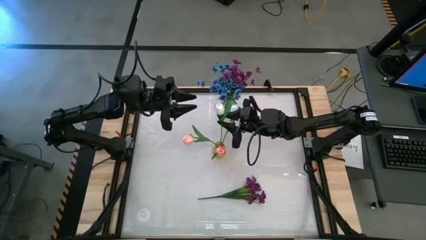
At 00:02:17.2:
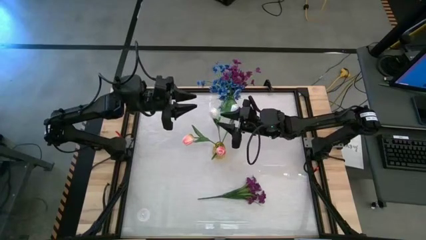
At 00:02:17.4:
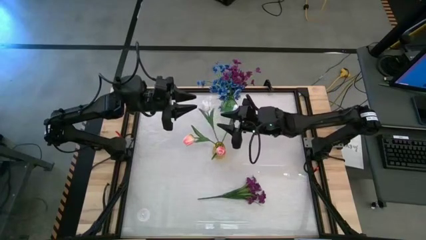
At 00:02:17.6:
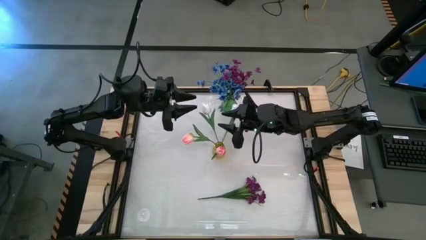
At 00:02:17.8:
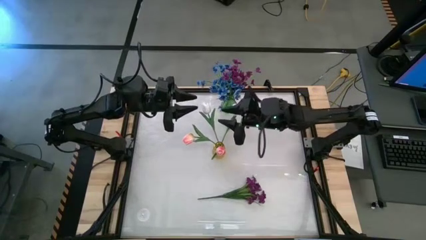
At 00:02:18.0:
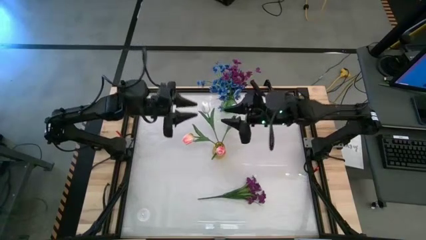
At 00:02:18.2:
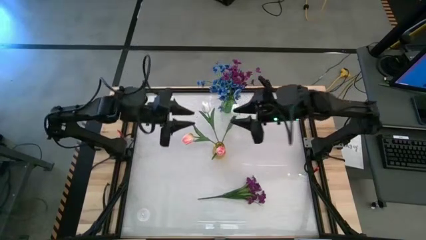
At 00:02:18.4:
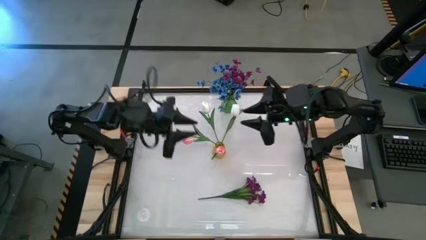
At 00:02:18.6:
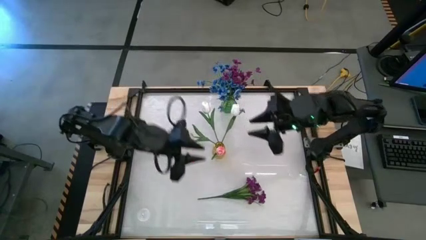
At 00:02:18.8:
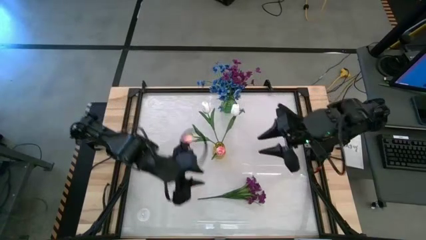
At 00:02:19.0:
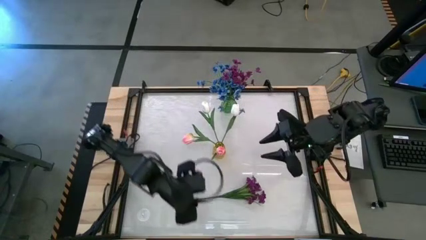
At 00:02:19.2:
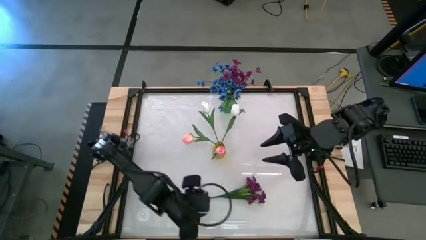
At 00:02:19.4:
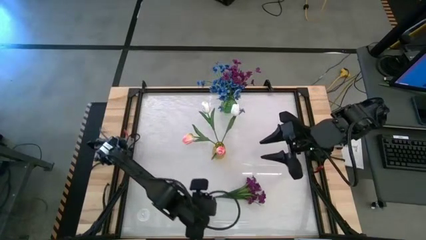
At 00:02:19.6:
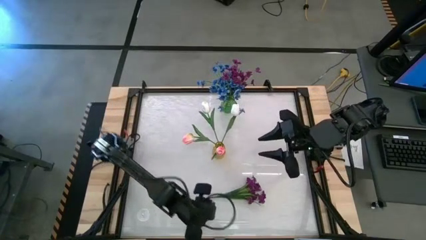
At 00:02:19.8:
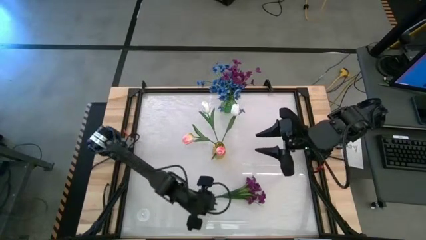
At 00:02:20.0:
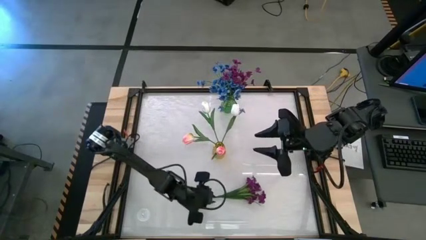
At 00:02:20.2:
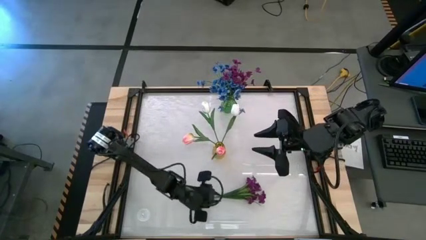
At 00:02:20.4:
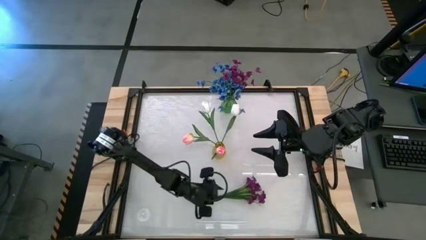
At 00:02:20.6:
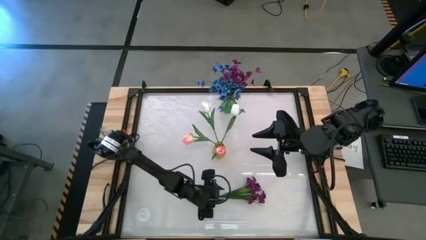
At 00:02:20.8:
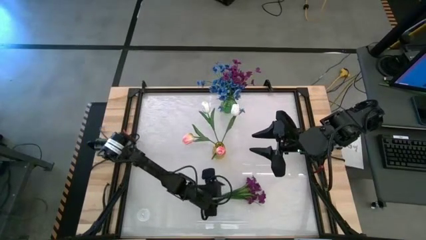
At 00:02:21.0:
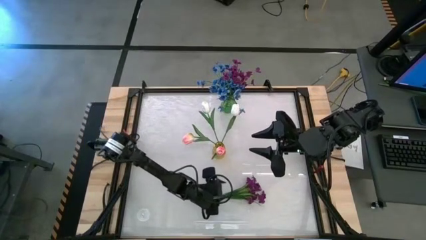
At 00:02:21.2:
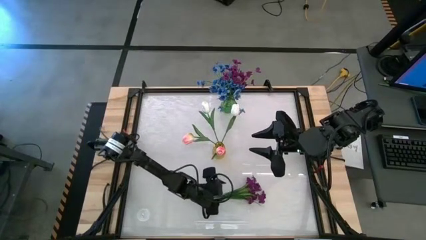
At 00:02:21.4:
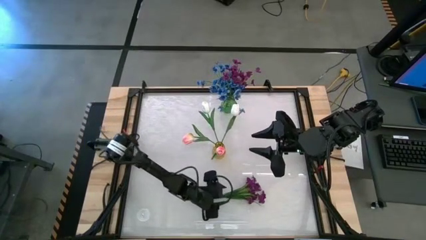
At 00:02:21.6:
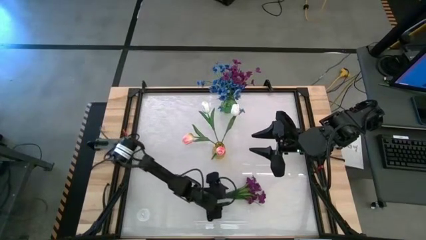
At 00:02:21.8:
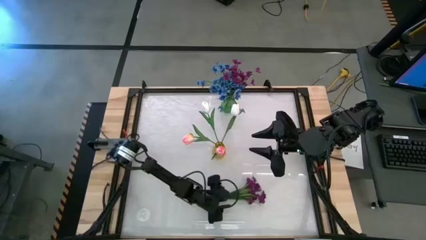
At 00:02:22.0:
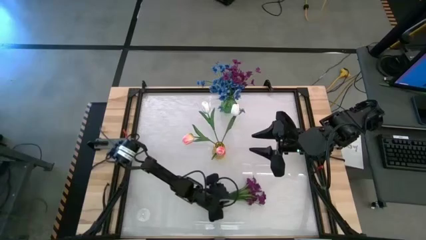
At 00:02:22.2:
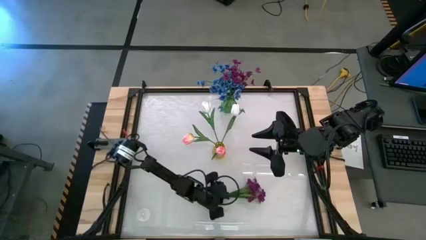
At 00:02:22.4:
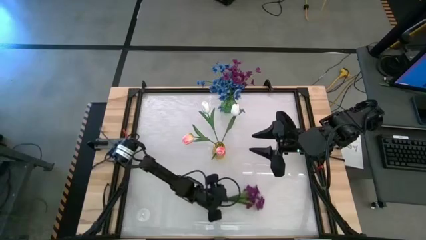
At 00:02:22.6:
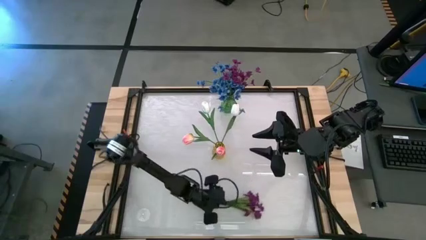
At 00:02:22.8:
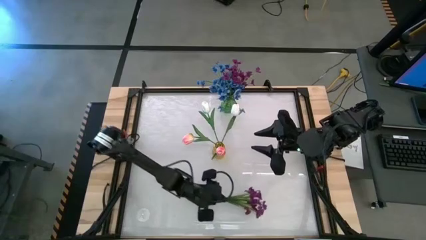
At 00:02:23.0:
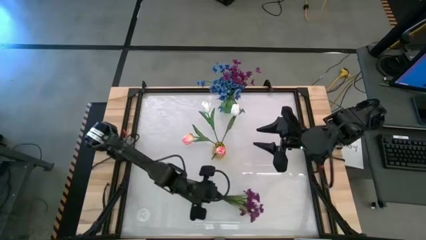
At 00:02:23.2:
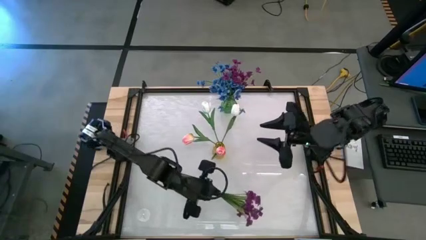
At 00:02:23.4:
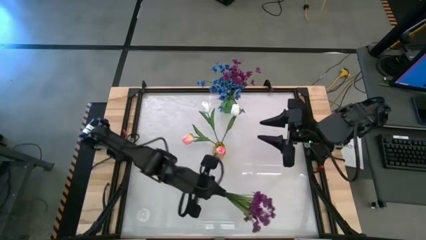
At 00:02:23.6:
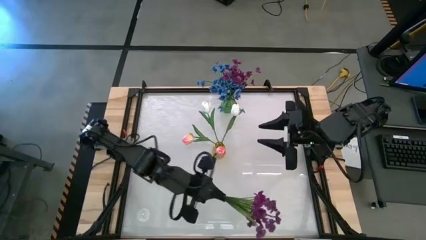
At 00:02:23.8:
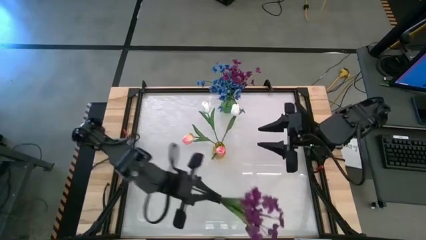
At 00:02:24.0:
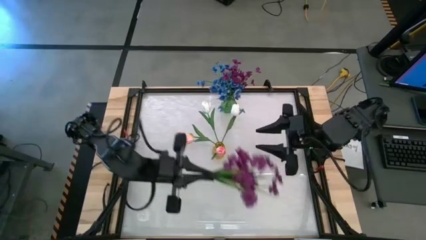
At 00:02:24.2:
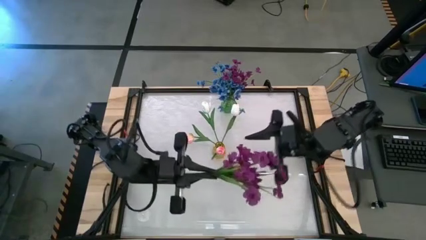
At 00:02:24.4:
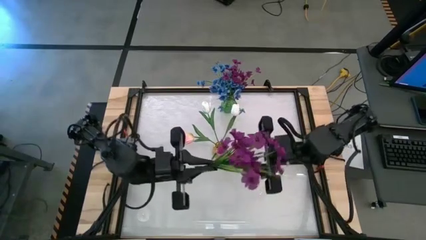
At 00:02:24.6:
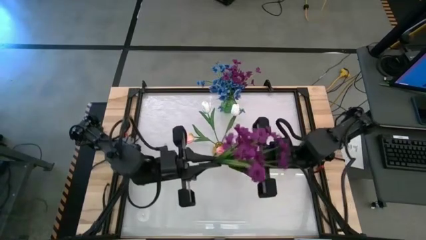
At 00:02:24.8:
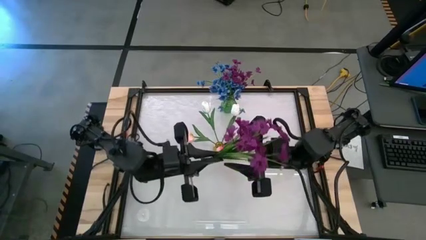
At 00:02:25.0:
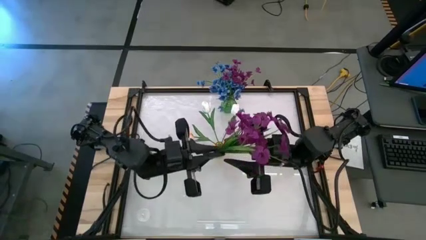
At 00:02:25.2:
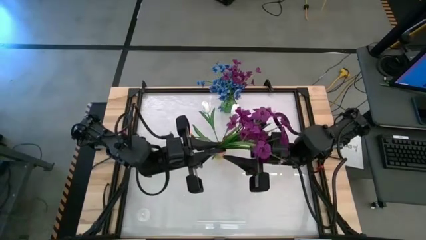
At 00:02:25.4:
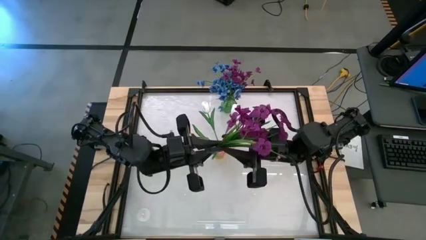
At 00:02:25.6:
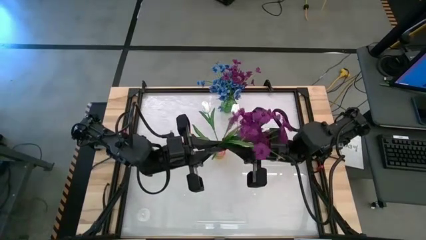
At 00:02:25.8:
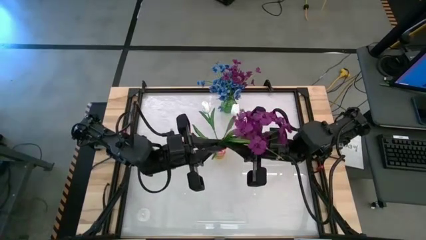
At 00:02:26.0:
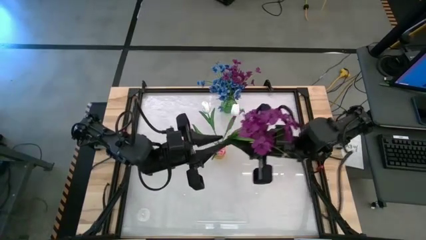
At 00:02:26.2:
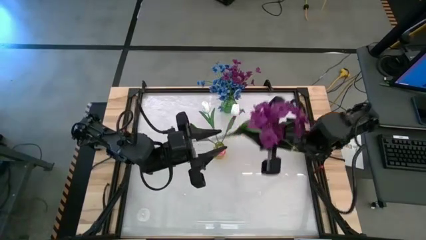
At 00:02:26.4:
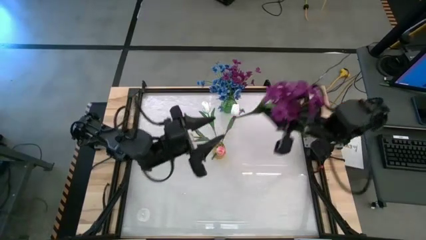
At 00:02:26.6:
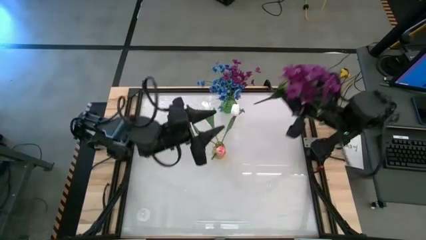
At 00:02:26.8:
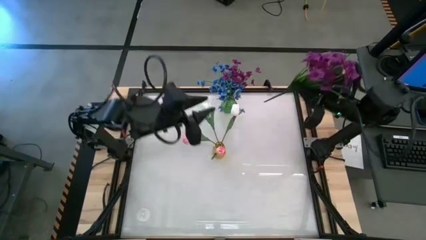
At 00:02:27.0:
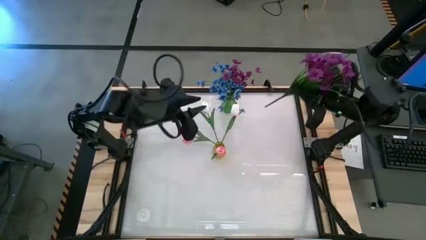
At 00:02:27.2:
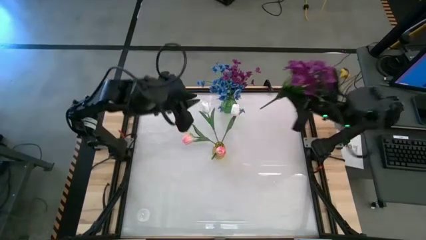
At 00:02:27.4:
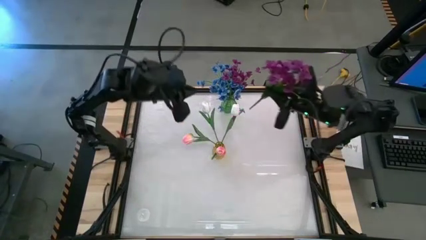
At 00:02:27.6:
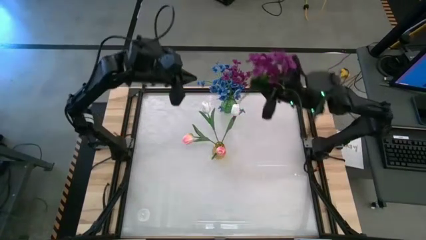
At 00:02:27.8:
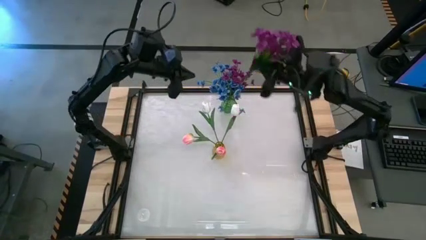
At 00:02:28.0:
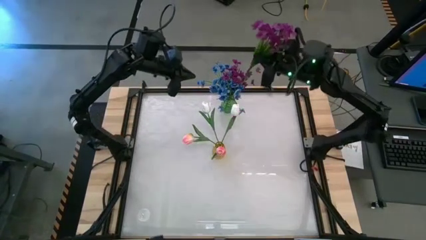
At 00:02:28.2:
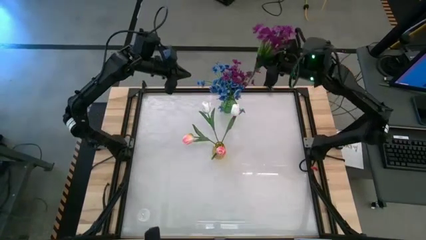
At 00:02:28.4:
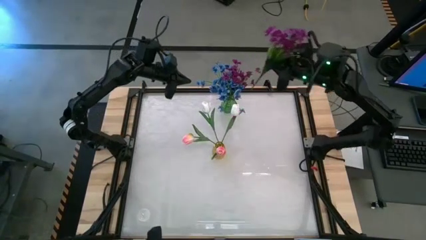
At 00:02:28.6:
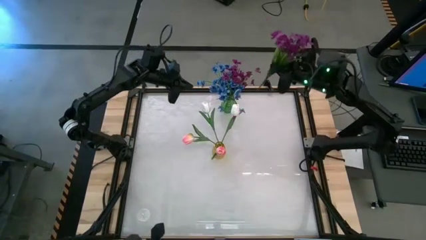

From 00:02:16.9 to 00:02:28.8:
Task: Sort flowers into vase by color
Put the purple flowers into the green vase

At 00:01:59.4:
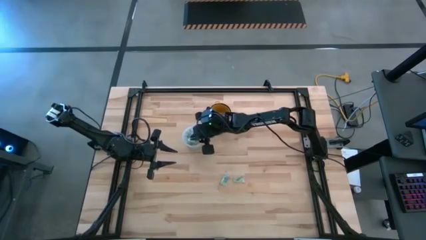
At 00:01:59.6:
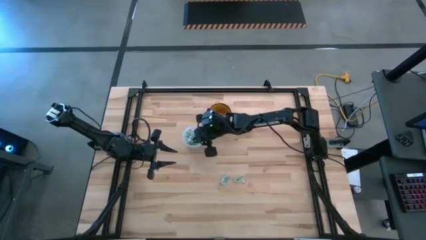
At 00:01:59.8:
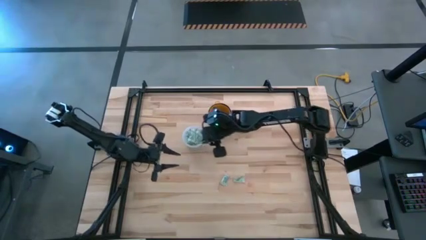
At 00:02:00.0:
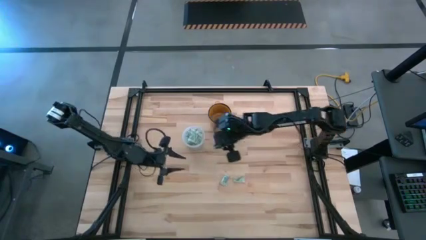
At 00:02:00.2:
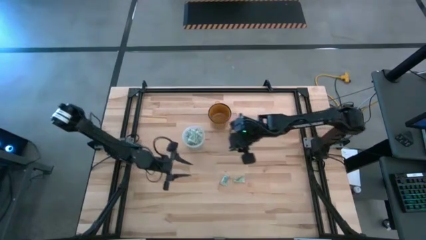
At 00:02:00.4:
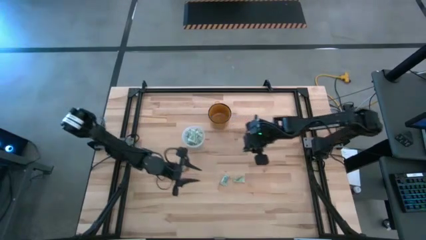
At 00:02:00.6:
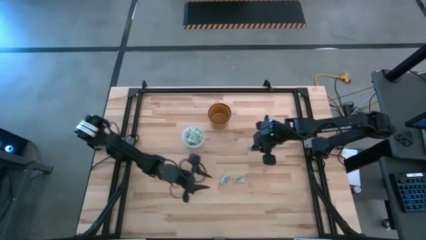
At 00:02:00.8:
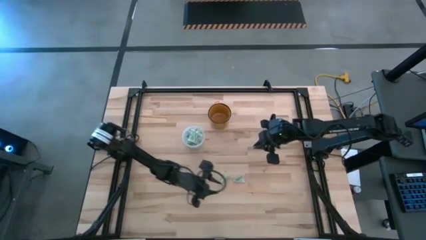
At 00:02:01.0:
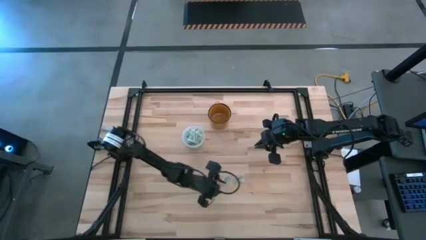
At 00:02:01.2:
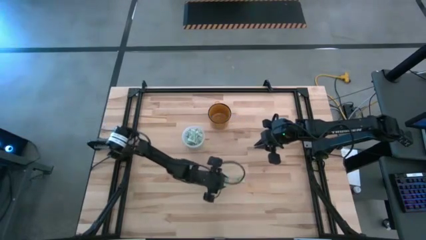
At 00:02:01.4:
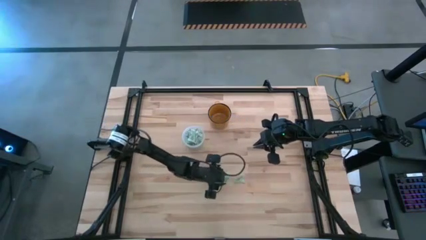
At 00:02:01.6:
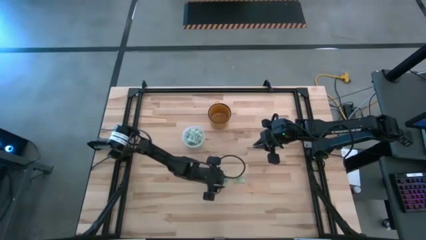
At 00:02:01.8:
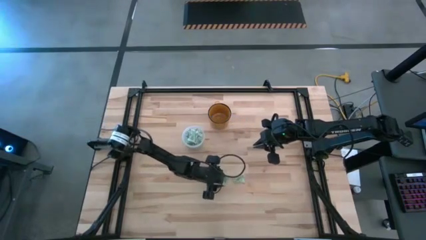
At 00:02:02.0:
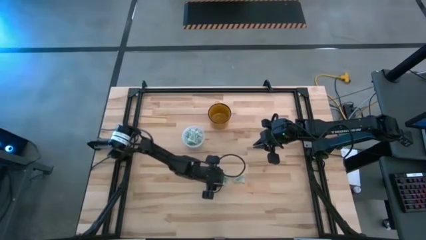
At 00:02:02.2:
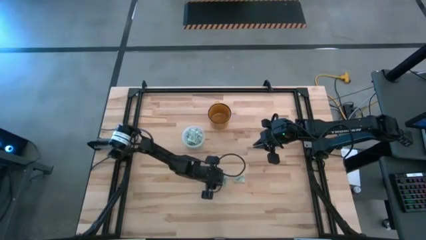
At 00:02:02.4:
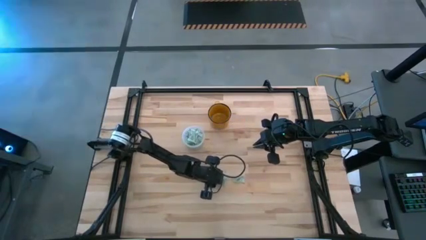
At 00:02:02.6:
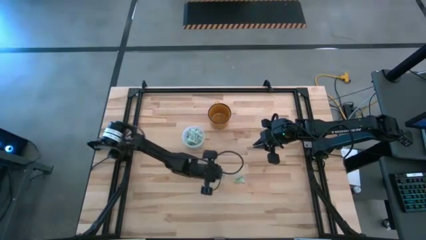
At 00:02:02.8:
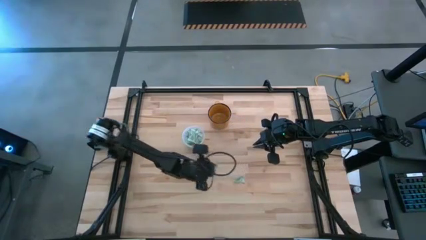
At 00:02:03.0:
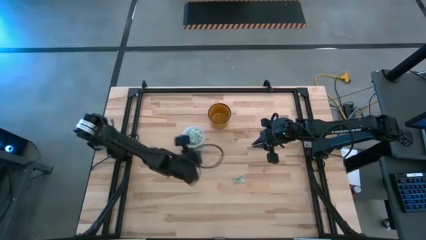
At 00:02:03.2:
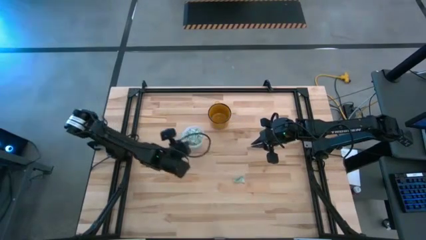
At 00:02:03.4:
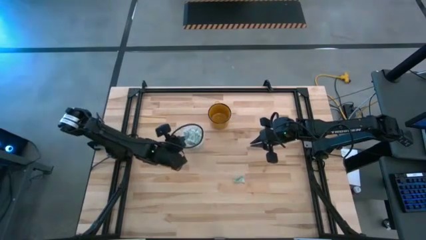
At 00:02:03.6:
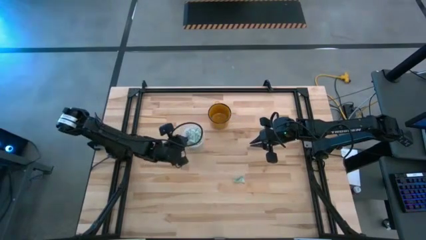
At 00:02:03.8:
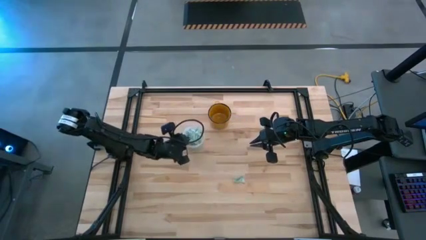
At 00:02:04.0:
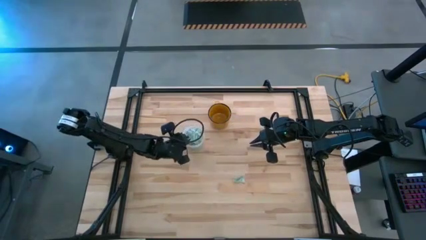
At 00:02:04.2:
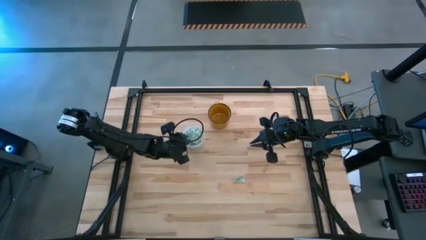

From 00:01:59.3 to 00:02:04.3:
Task: Pick and place Stevia / Truvia into bins
Put the stevia packet into the transparent bin
